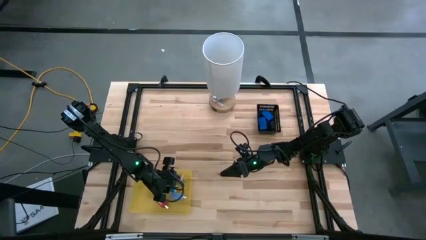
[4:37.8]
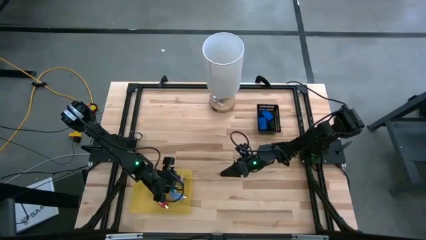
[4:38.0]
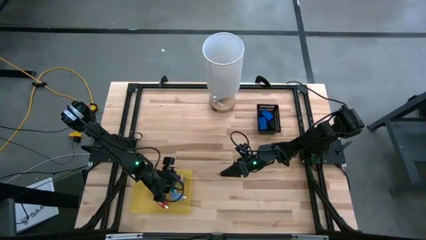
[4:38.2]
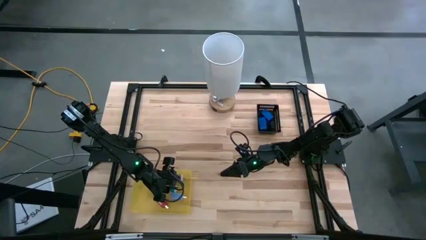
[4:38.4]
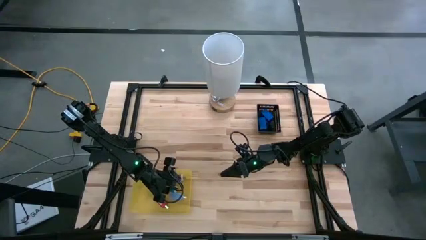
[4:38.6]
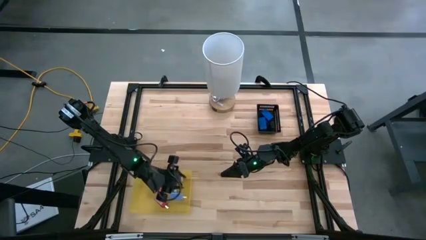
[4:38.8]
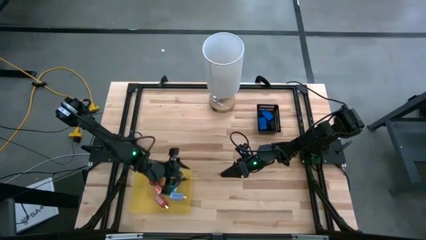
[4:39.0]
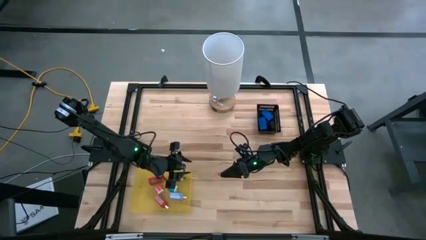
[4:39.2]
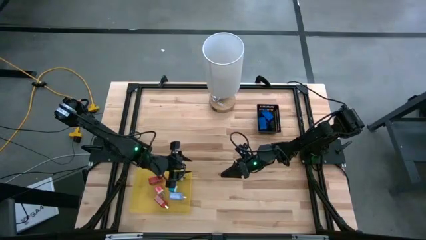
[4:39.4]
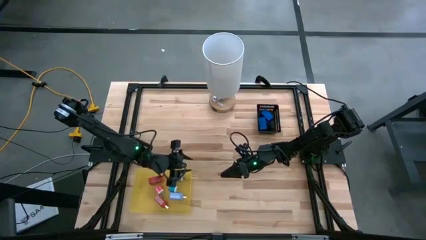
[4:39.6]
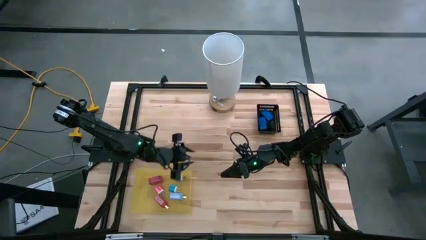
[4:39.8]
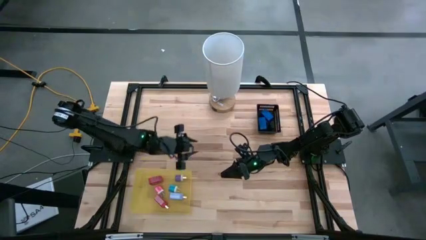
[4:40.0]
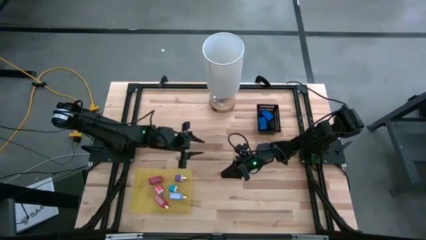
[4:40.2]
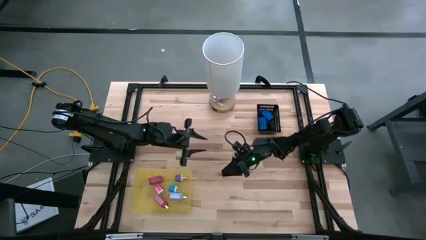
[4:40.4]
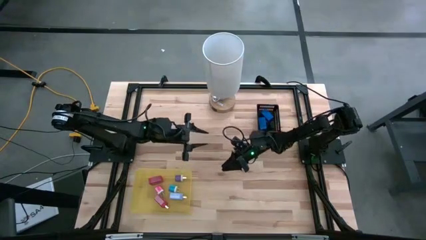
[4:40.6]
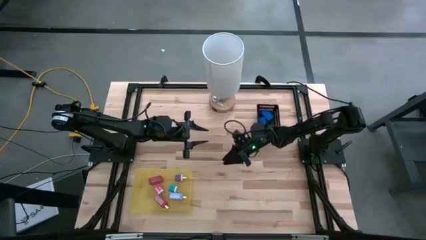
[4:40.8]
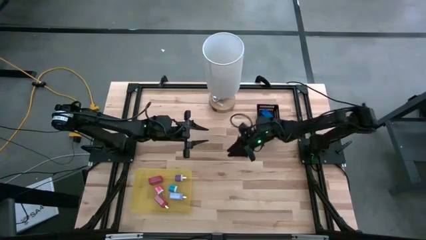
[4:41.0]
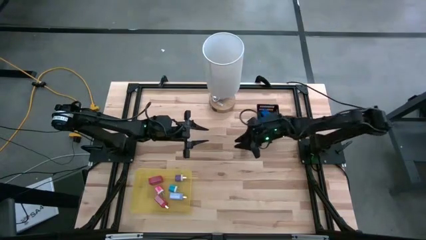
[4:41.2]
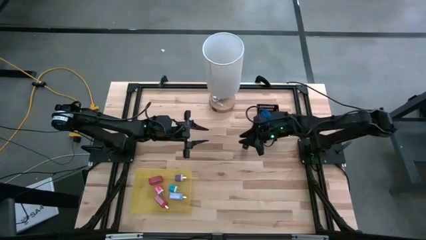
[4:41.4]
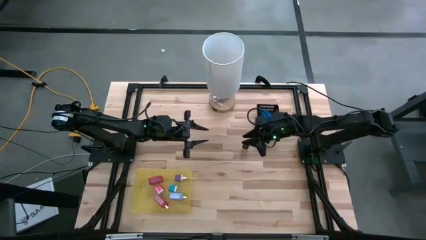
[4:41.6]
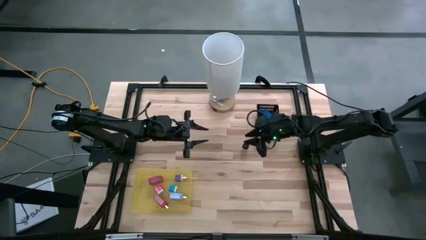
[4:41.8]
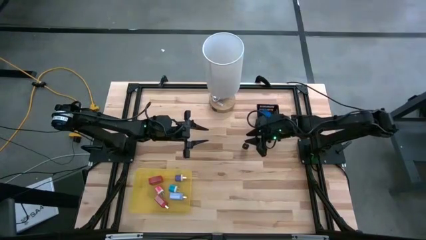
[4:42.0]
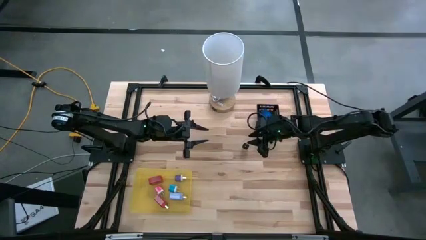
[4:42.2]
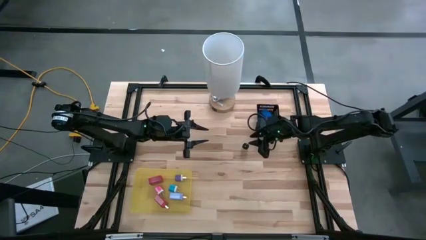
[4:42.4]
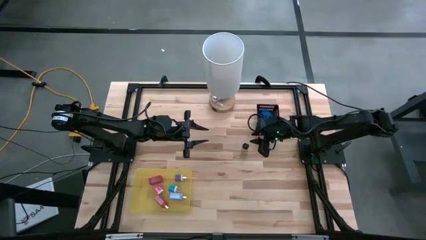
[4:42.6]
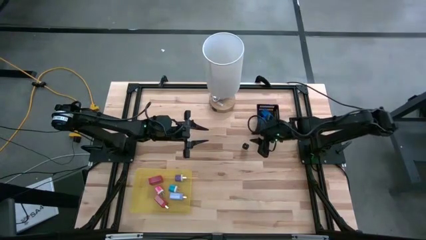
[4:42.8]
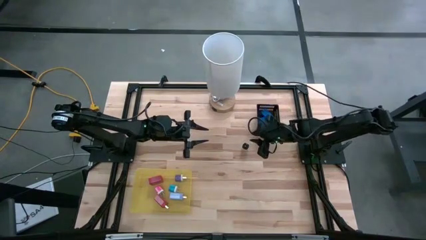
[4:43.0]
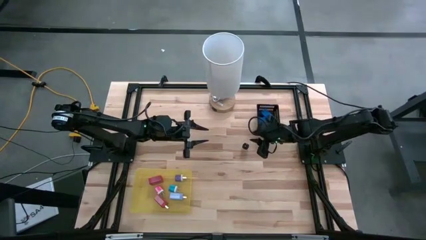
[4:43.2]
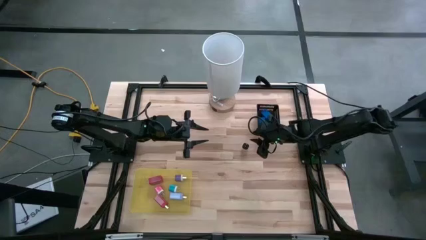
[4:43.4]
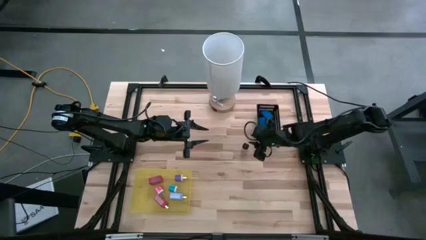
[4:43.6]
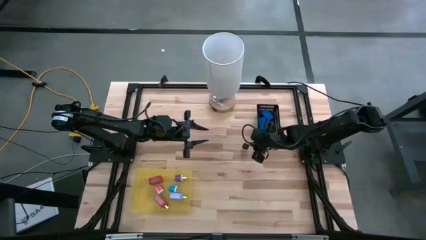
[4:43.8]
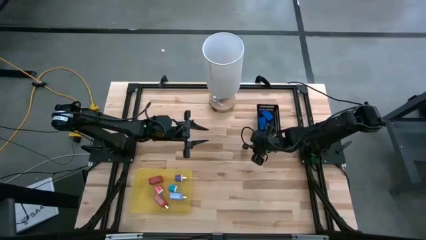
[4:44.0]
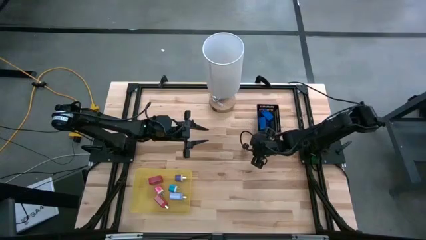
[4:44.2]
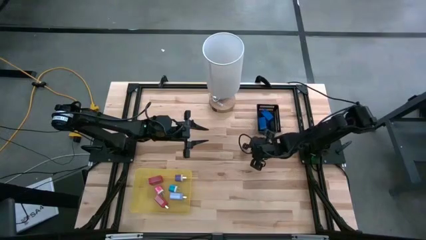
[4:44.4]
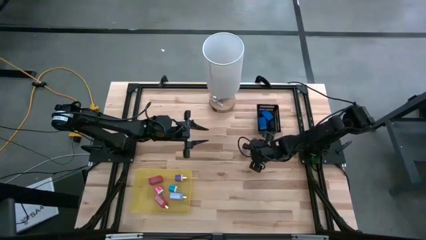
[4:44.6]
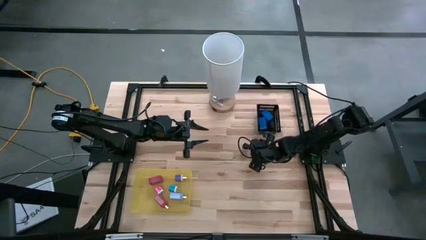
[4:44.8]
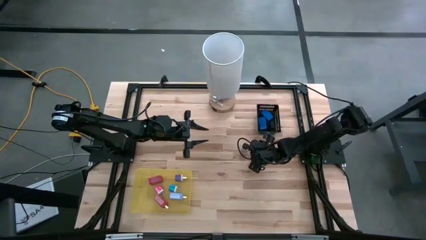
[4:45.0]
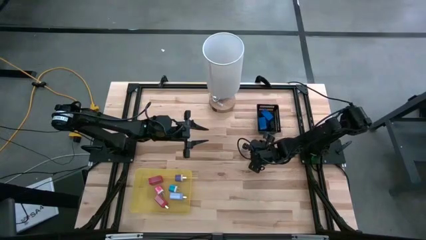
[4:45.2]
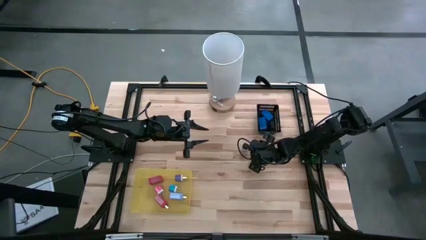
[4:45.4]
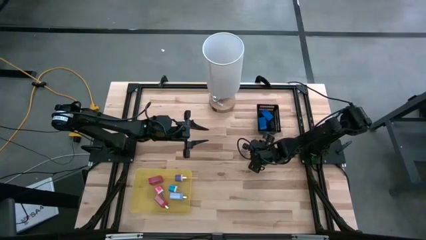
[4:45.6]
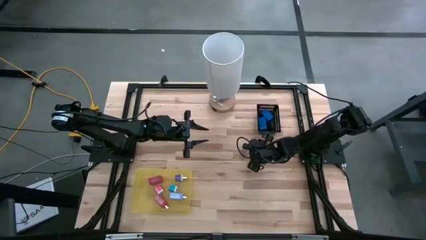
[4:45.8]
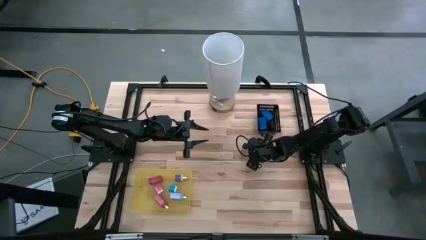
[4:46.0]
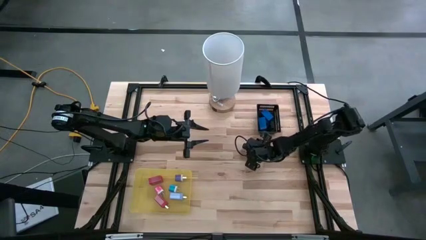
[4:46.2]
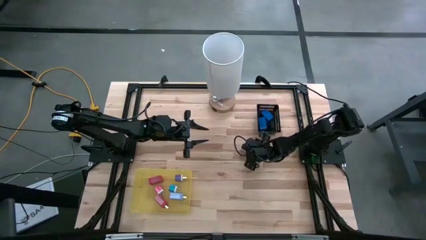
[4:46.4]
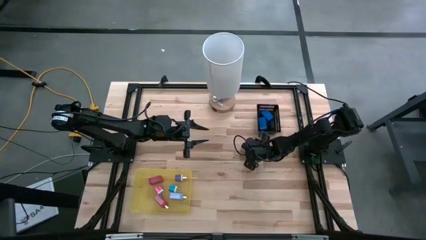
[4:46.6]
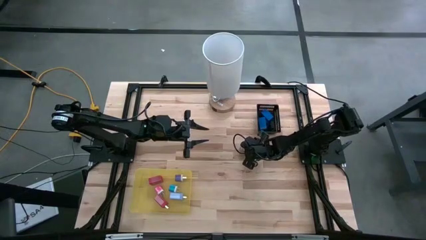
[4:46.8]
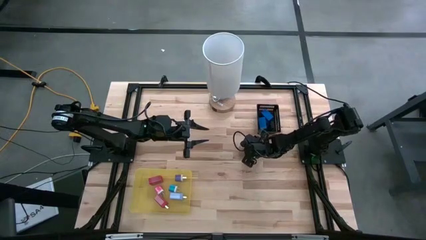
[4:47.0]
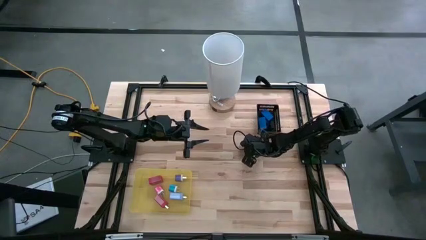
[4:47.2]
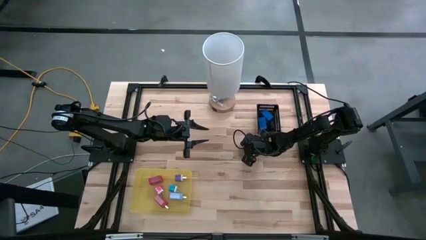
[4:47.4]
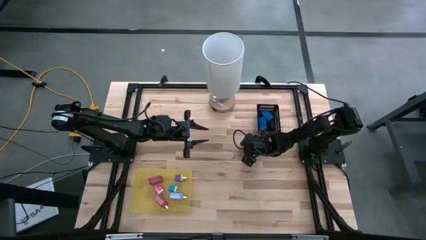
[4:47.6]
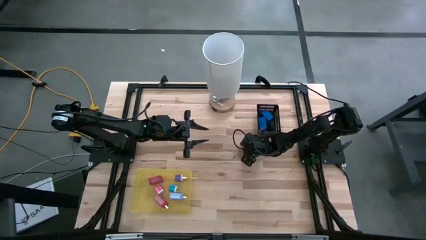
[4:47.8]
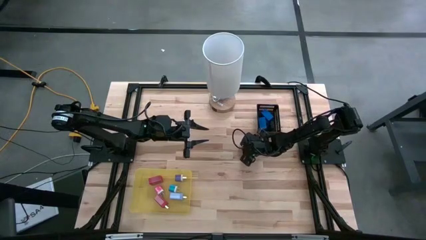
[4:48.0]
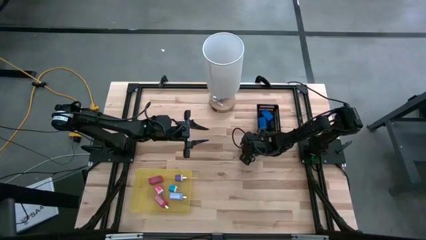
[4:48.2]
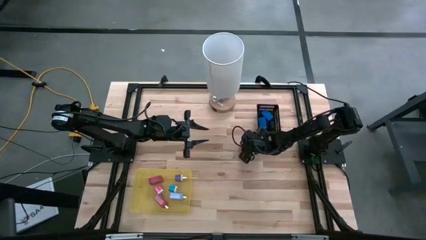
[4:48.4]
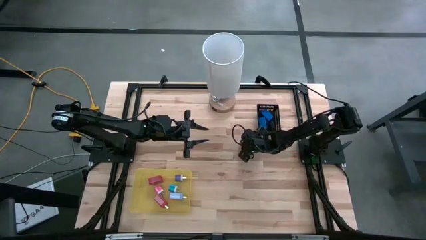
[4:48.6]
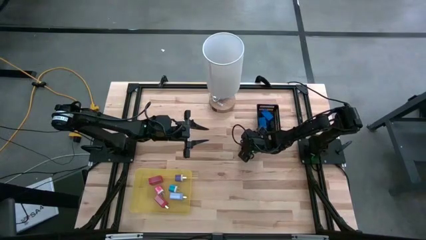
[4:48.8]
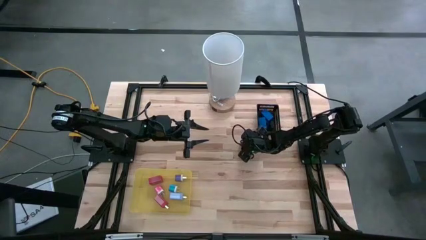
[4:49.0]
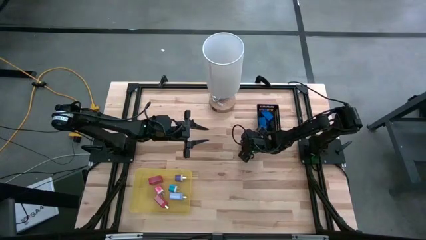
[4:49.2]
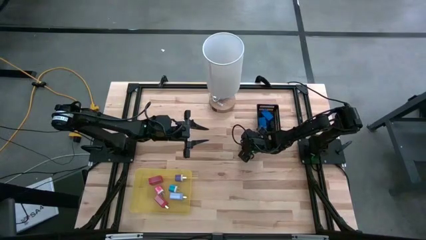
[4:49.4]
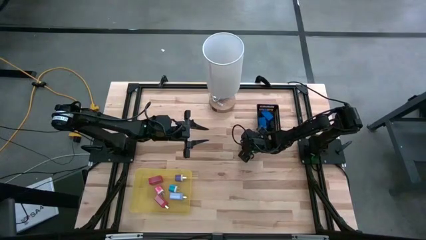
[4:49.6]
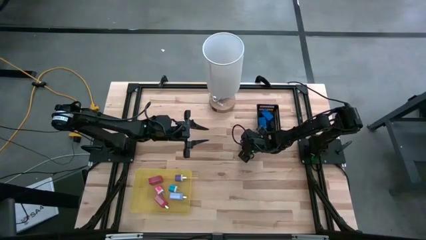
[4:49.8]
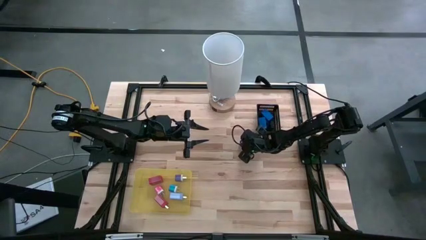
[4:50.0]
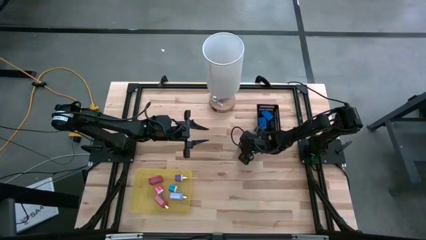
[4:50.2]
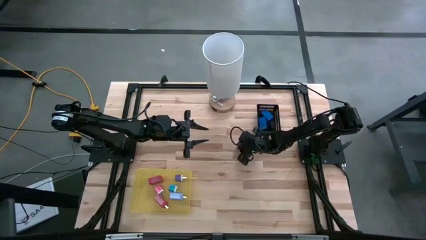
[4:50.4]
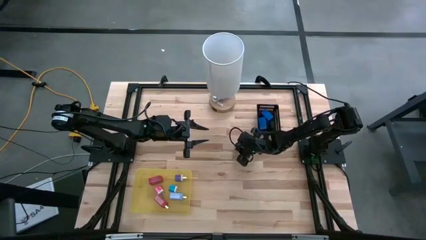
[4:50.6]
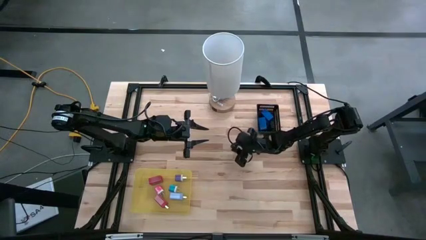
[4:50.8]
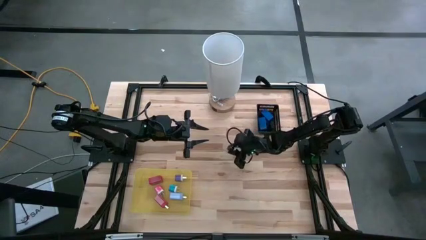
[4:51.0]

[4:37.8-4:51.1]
Task: Pick & Place Office items
Put the white charger adapter into the yellow bin

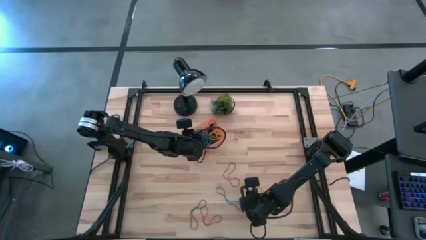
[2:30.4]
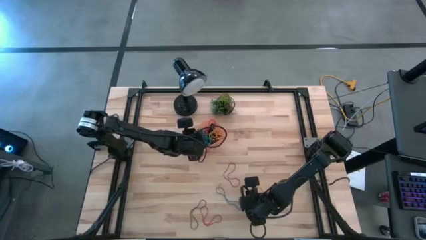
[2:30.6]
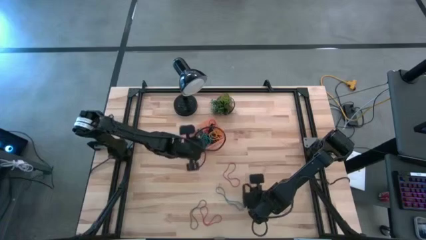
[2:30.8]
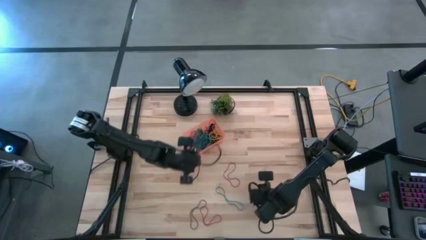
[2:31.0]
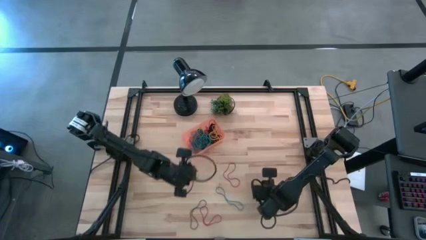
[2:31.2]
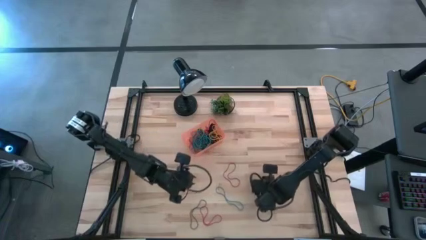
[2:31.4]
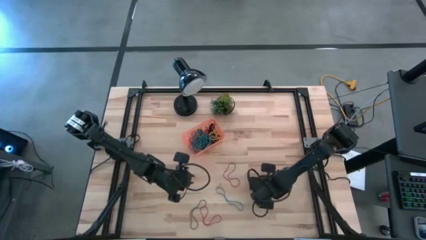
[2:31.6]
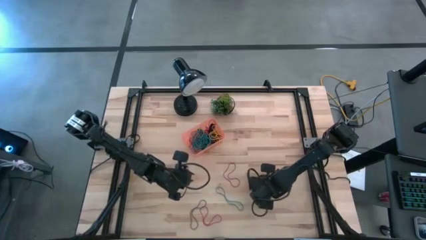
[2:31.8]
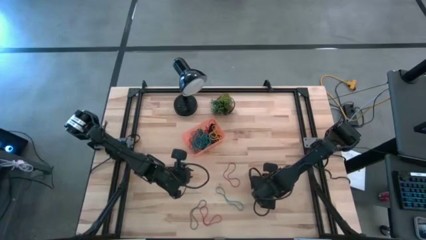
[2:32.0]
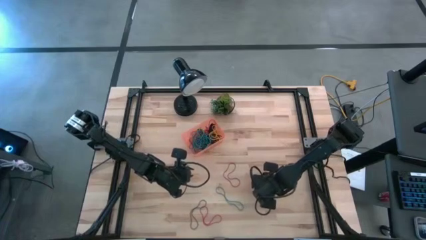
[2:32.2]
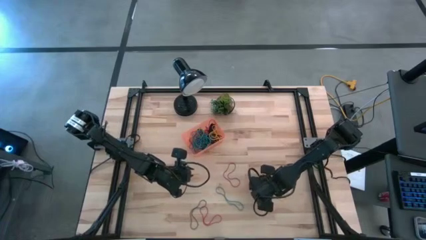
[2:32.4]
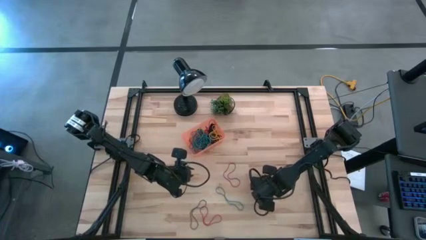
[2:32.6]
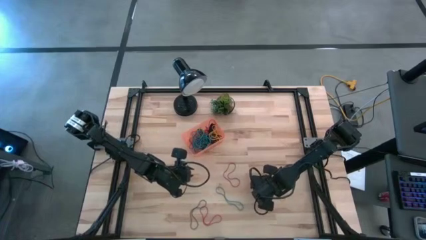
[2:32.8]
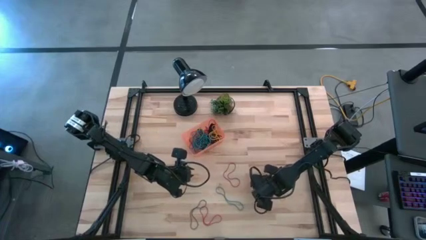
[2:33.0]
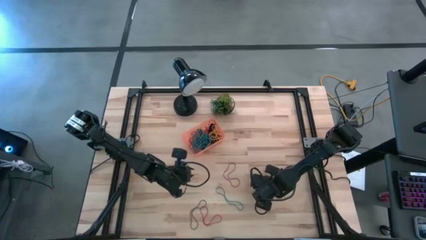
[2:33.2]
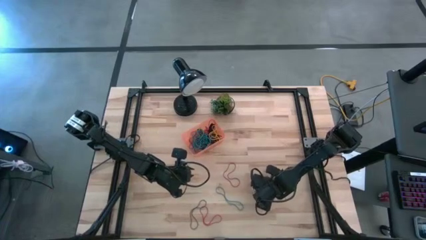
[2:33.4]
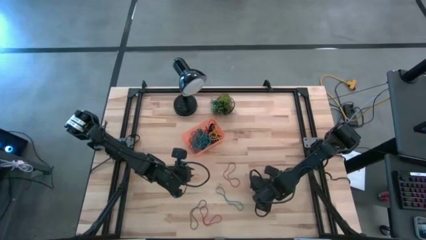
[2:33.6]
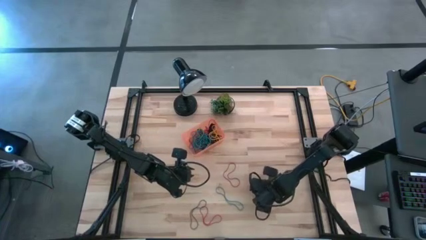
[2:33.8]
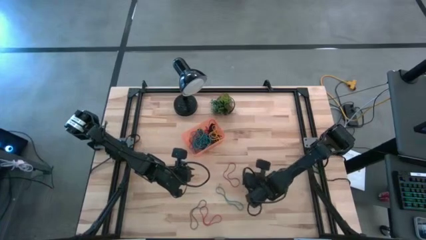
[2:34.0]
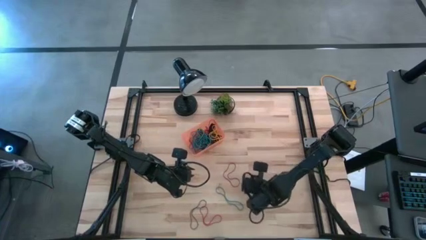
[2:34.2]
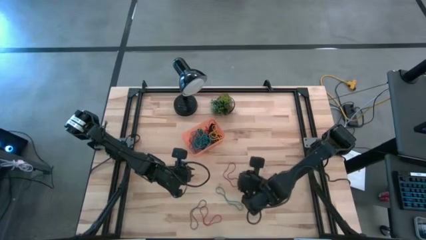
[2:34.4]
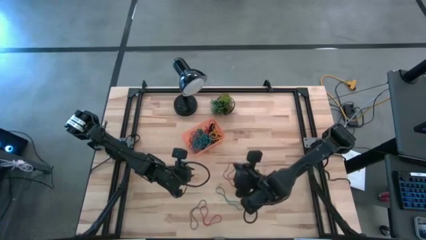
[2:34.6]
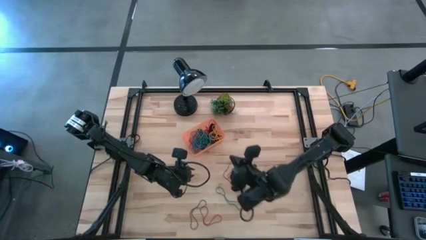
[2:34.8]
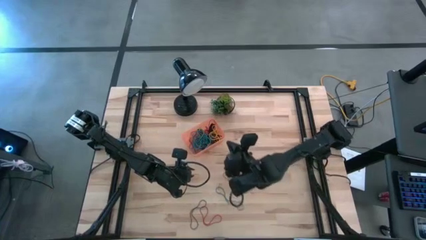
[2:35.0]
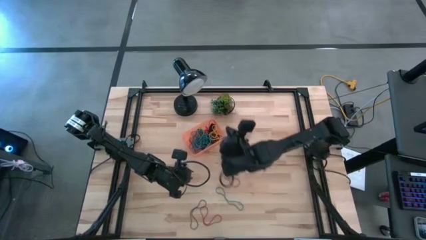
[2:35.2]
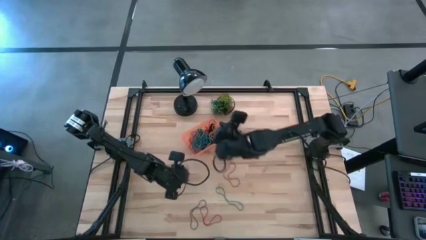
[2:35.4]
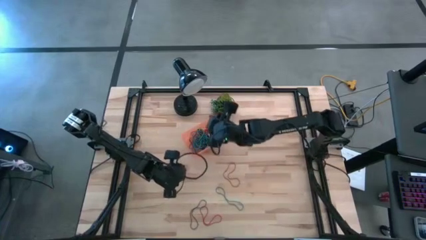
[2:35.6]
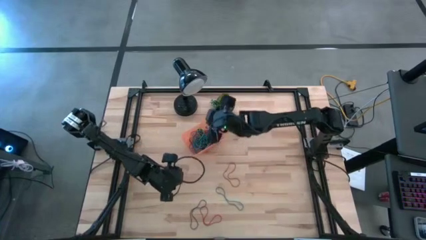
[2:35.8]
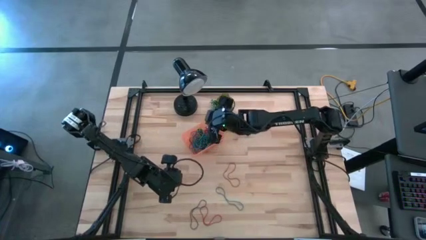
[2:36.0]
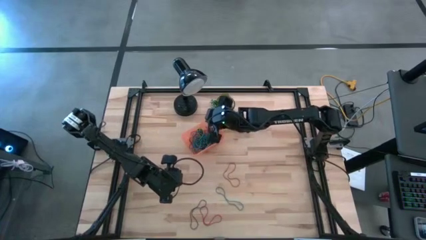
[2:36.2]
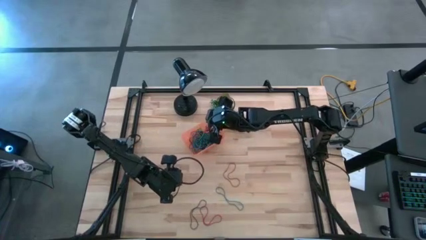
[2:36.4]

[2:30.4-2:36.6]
Task: Pick and place rubber bands into bin
Put the yellow rubberband into the orange bin
